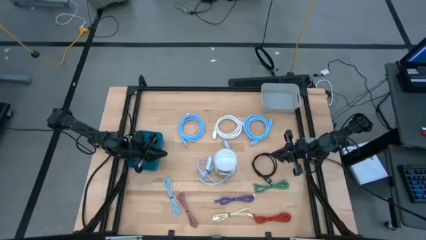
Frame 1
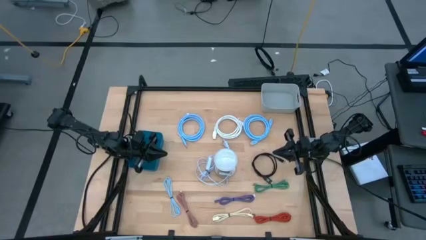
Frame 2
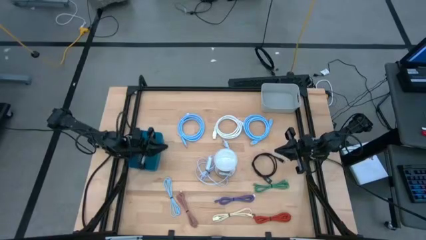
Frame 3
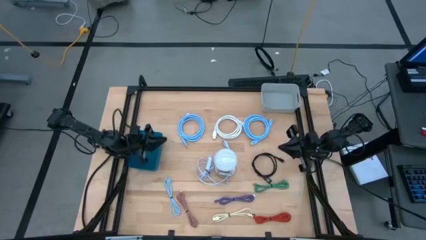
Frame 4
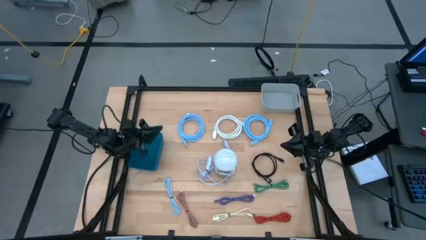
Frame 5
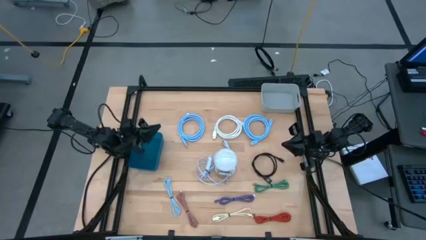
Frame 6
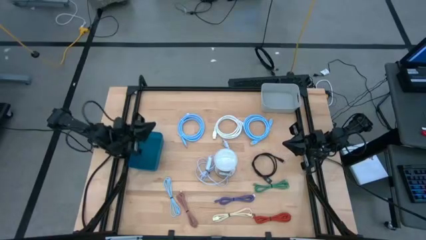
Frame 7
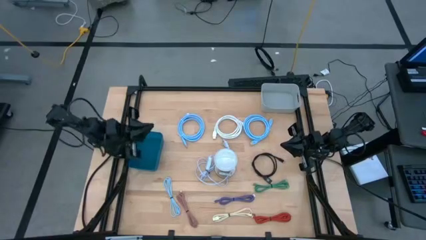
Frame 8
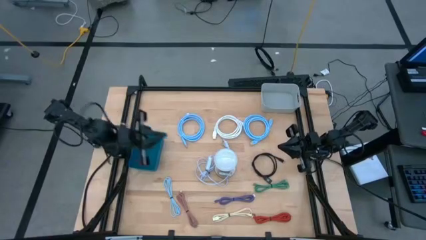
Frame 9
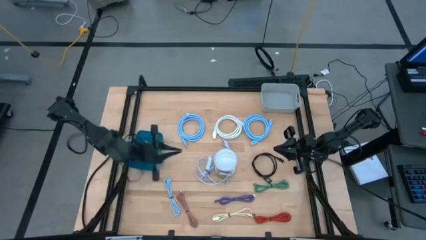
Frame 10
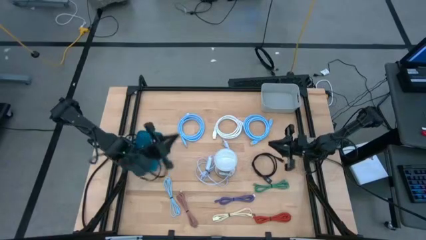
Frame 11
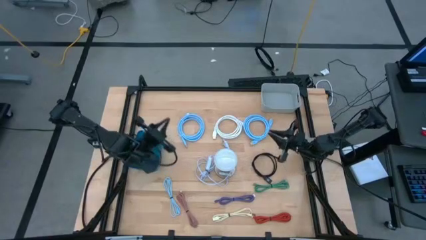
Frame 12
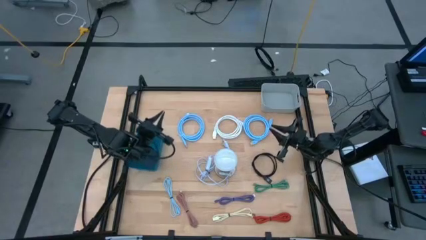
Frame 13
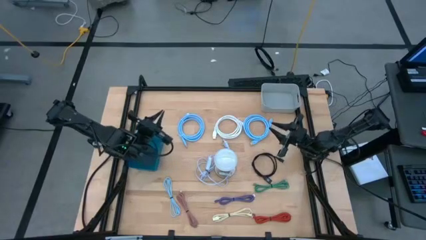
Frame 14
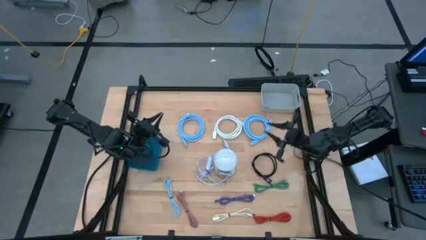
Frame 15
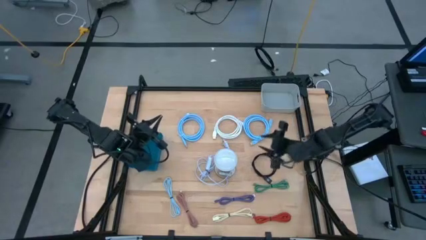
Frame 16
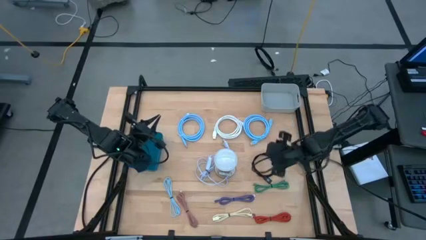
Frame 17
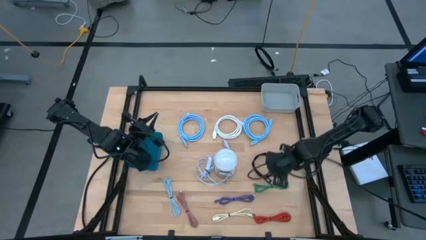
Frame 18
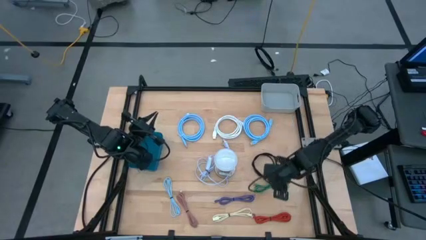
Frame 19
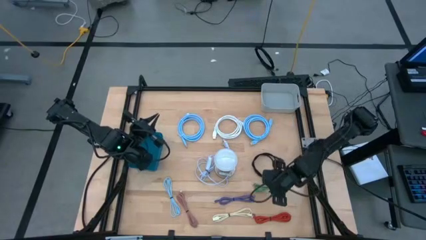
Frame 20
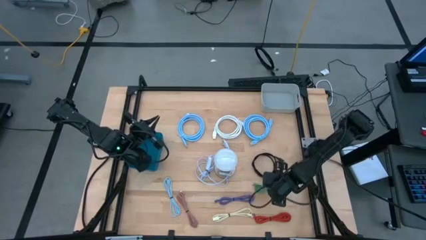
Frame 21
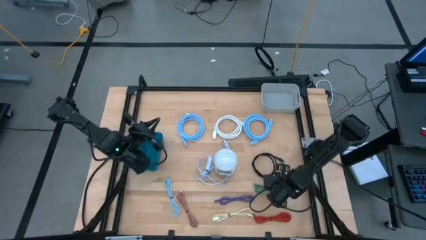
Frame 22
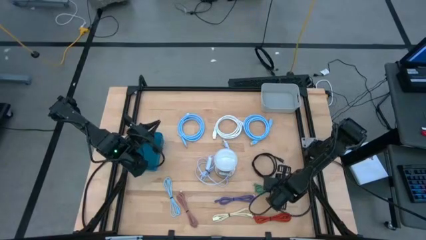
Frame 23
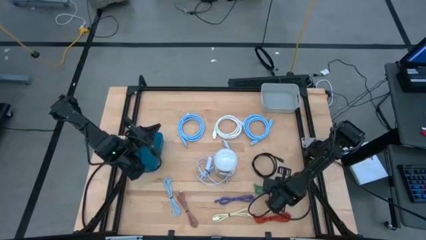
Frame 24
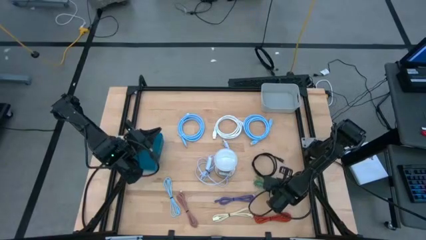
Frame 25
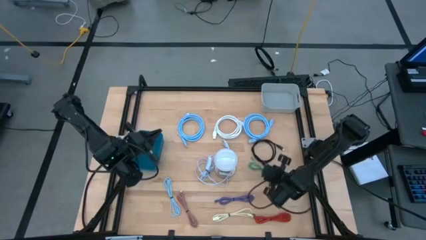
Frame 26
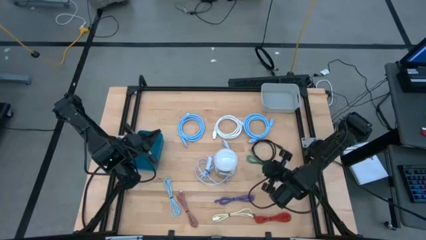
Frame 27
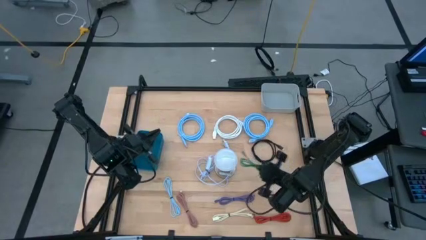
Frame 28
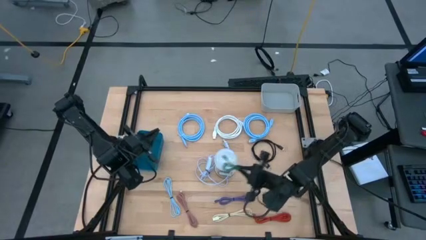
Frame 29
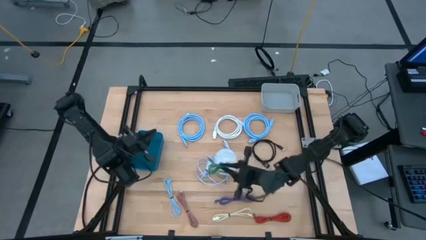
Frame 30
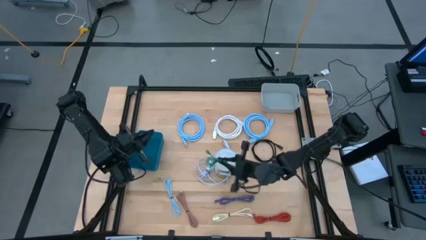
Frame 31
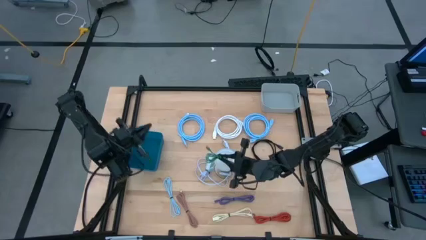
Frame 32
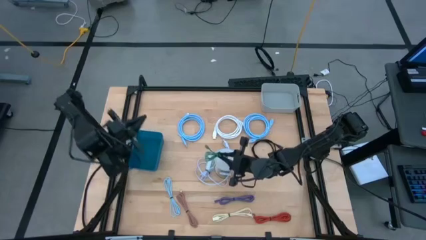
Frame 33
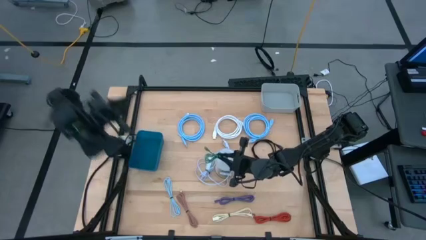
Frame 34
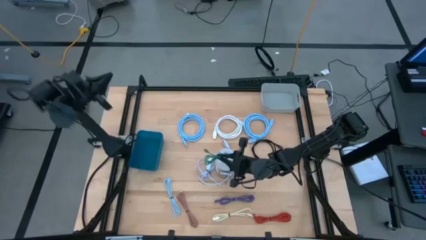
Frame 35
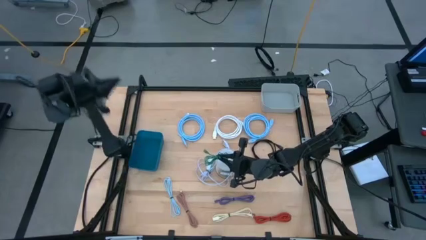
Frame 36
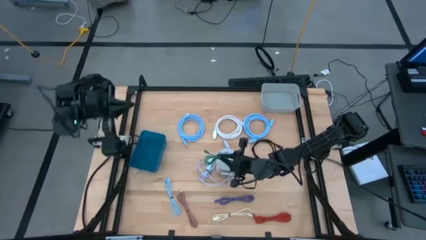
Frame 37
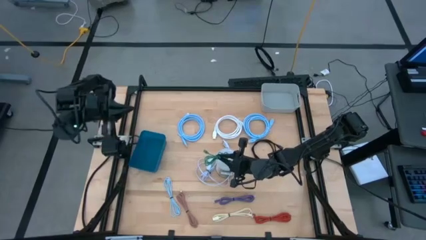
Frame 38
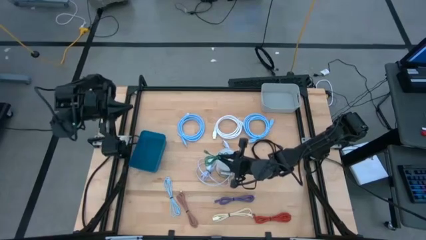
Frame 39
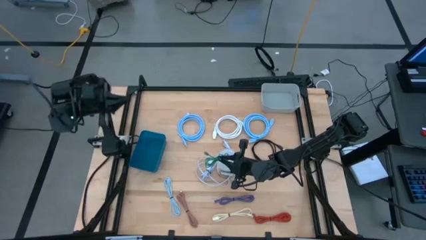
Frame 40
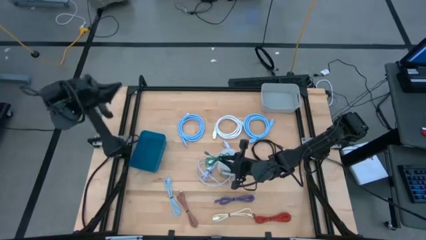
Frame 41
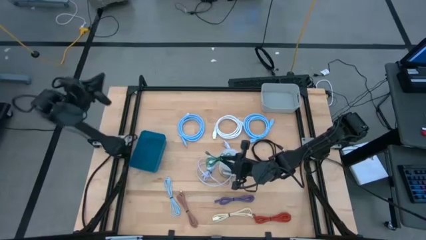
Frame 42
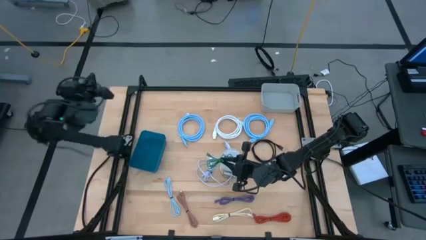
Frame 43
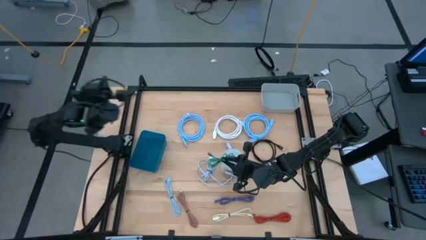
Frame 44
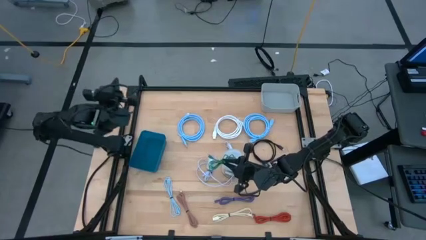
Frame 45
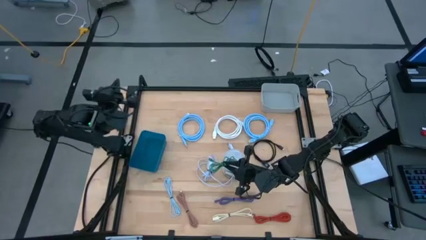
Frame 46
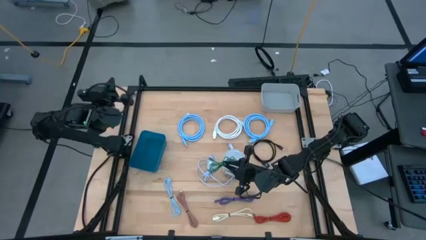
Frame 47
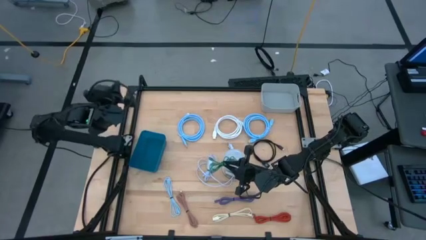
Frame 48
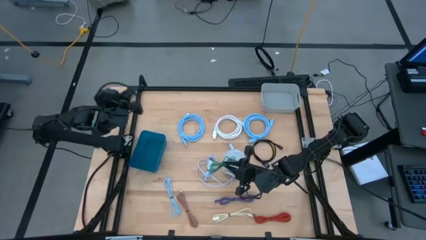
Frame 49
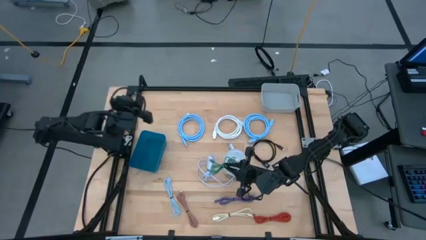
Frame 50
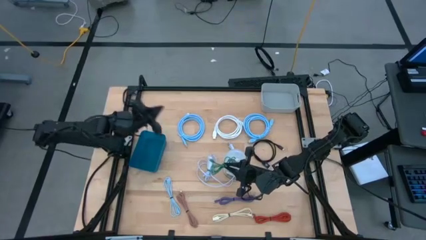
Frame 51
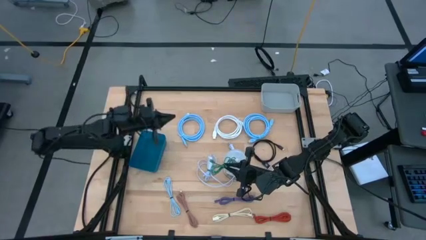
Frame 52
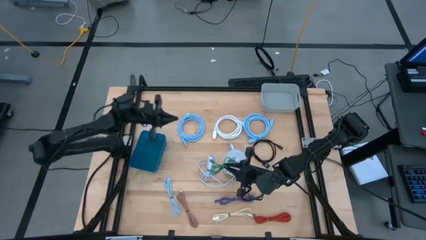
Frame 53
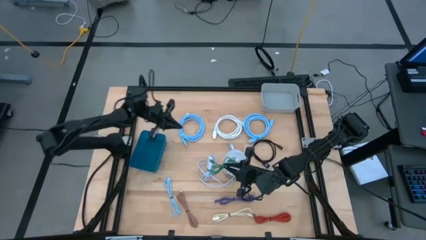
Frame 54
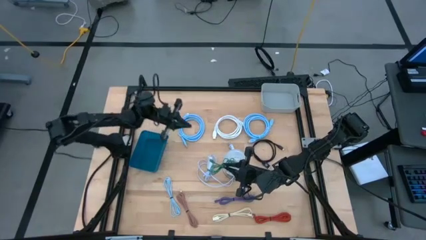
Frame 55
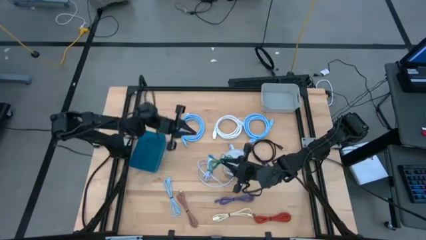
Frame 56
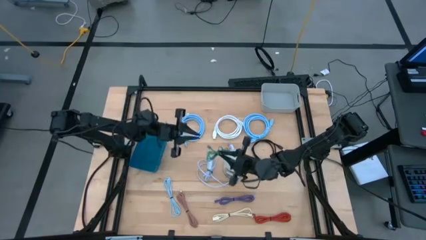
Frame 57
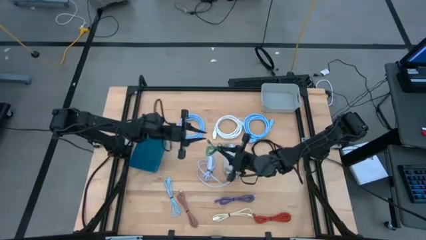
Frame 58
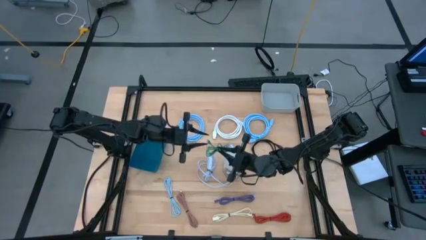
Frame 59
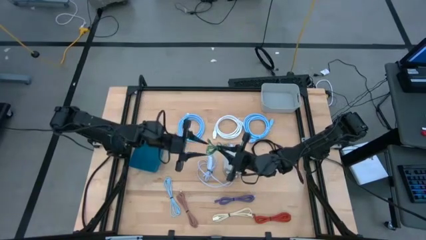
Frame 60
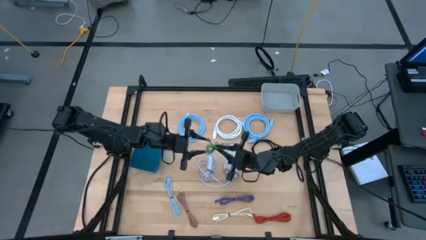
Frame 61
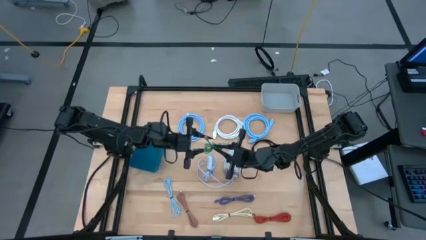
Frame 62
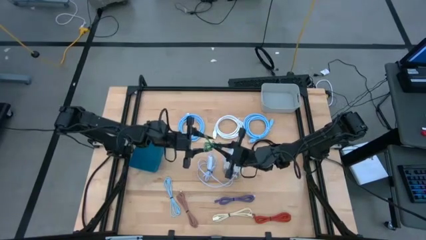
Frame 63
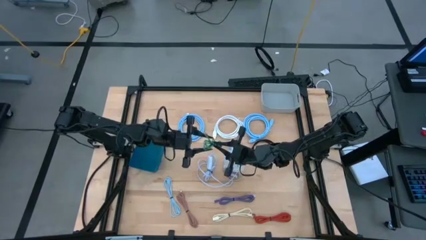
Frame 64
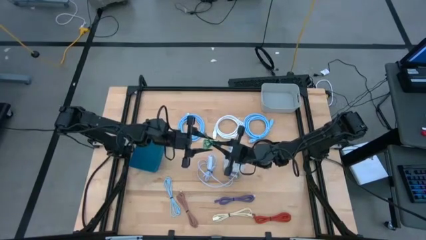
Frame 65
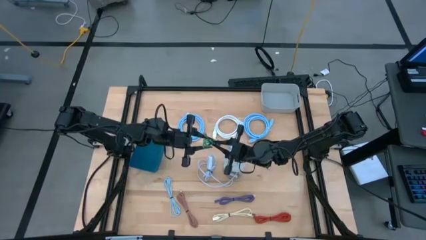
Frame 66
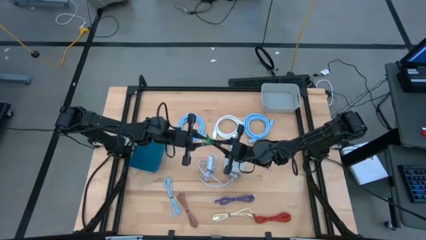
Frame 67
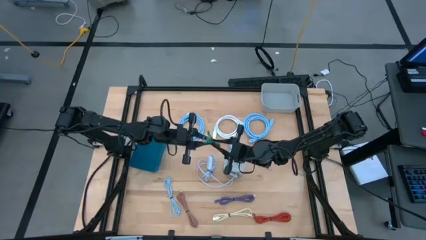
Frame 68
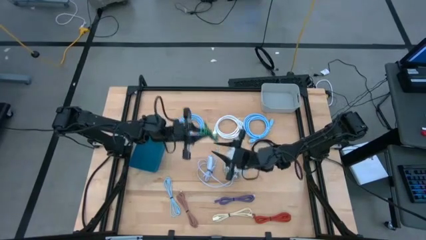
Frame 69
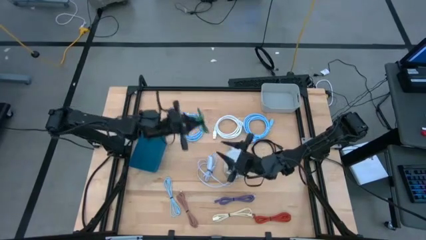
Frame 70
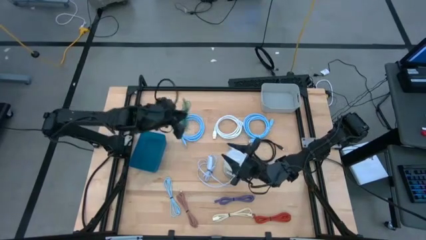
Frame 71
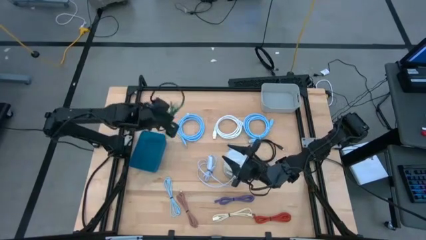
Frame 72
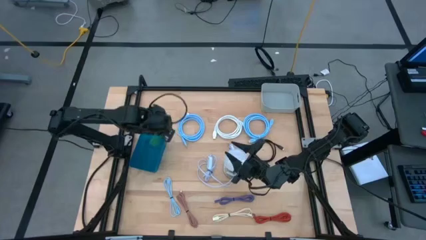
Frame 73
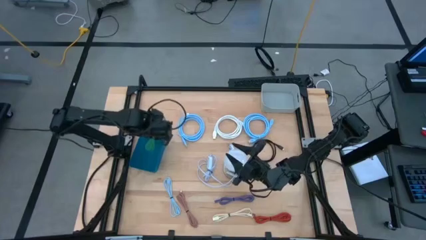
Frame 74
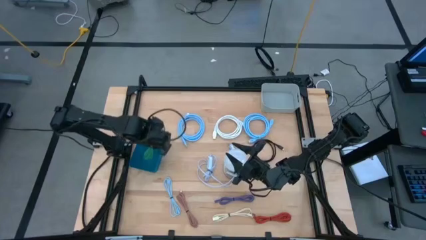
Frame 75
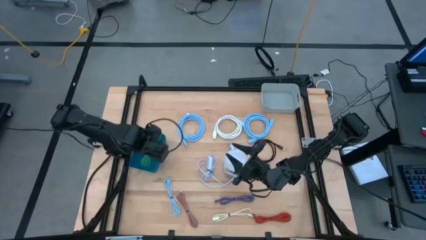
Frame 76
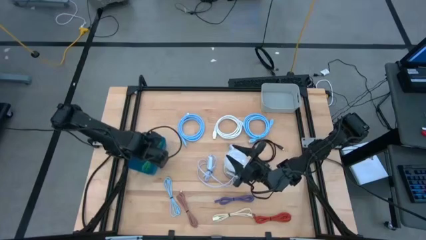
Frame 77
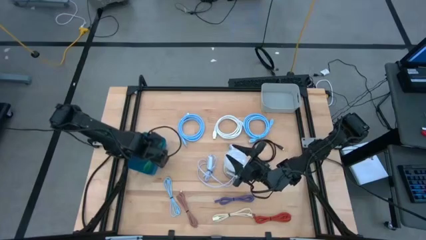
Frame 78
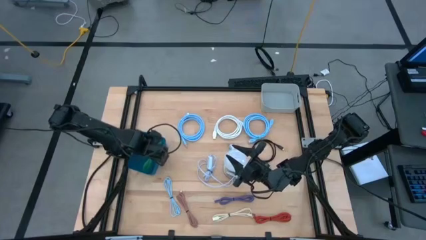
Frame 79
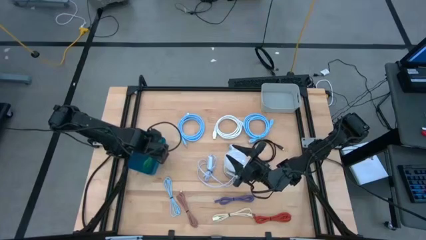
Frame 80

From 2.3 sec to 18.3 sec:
Task: Pick & Place USB Port
Put the green charger cable into the blue bin
